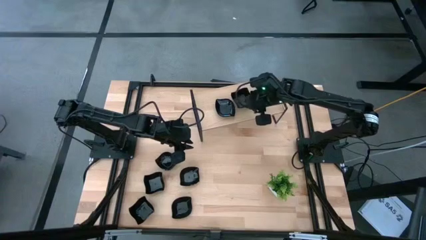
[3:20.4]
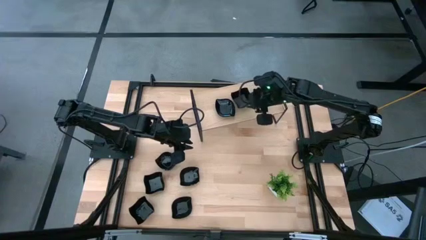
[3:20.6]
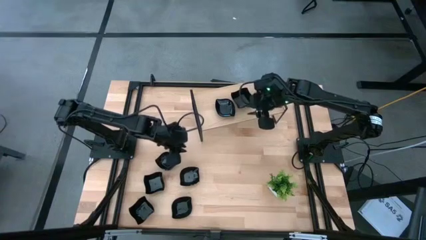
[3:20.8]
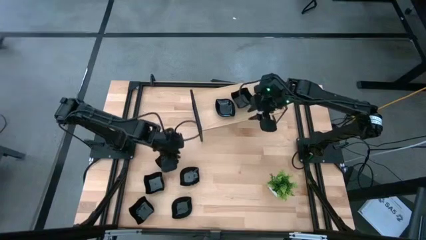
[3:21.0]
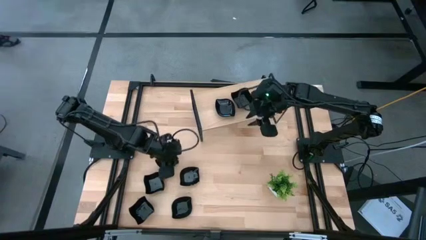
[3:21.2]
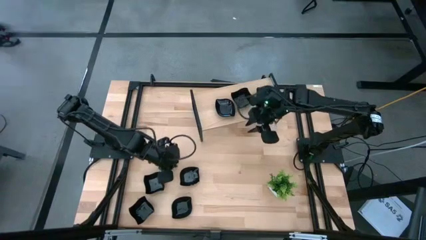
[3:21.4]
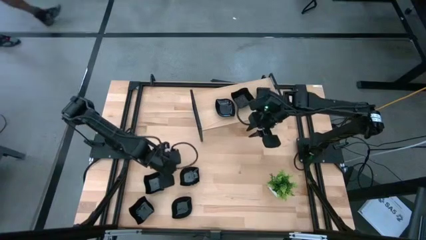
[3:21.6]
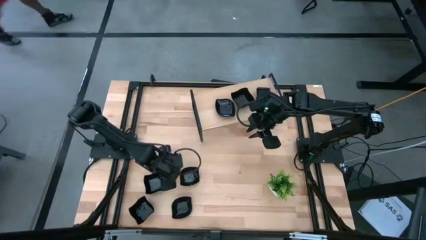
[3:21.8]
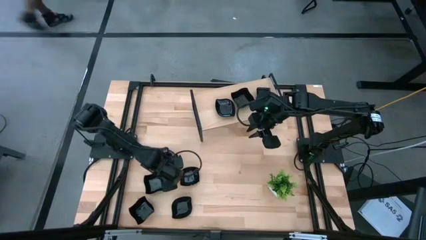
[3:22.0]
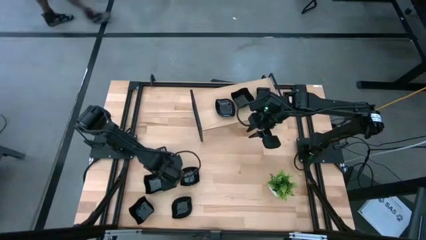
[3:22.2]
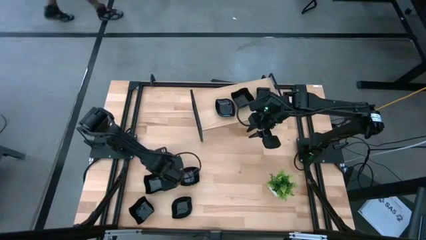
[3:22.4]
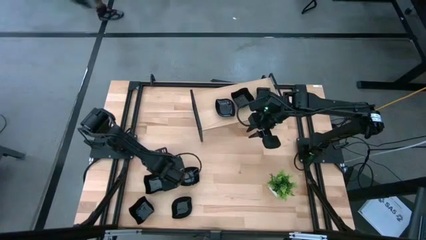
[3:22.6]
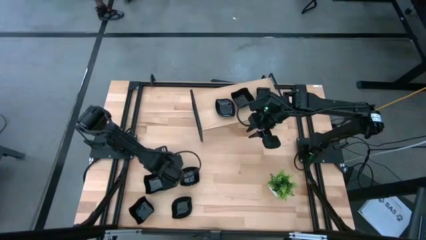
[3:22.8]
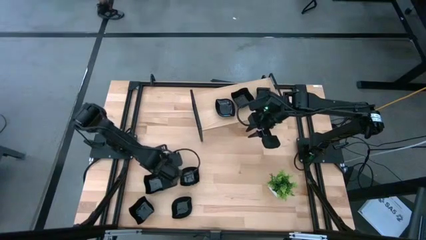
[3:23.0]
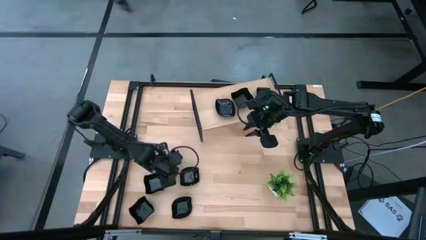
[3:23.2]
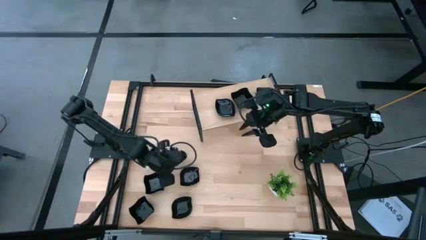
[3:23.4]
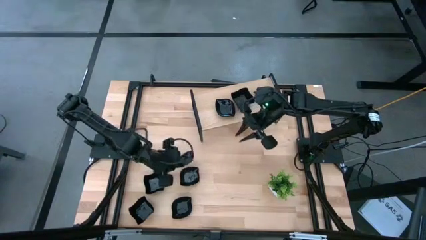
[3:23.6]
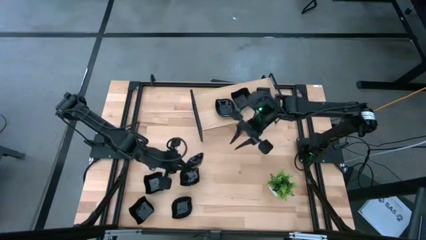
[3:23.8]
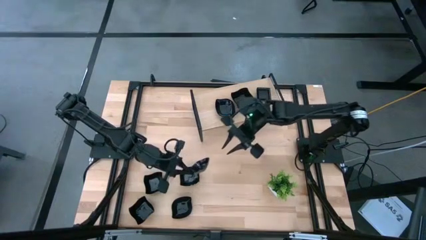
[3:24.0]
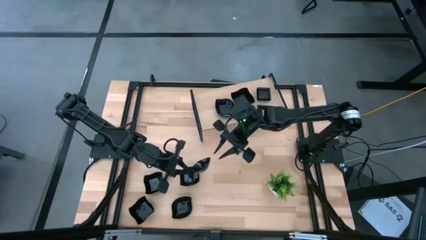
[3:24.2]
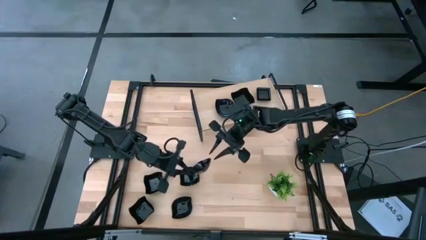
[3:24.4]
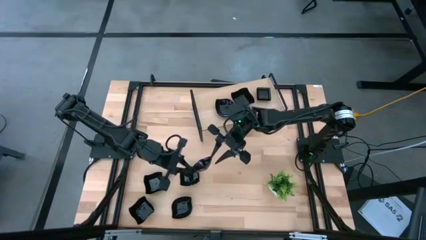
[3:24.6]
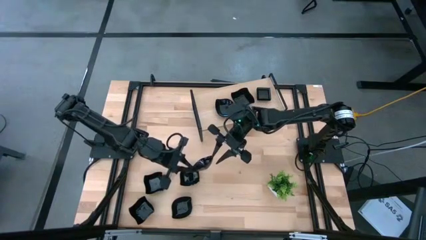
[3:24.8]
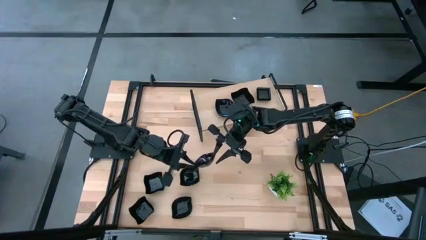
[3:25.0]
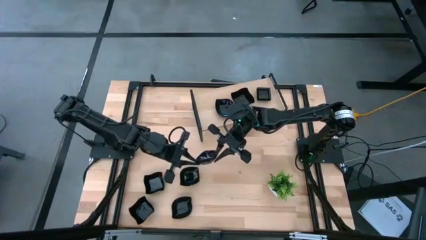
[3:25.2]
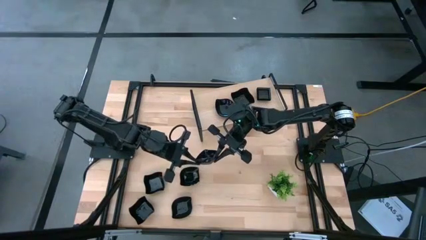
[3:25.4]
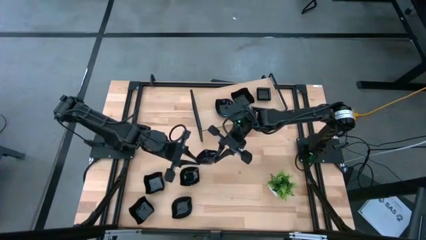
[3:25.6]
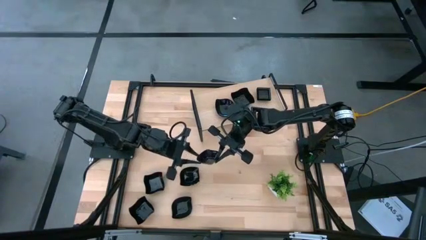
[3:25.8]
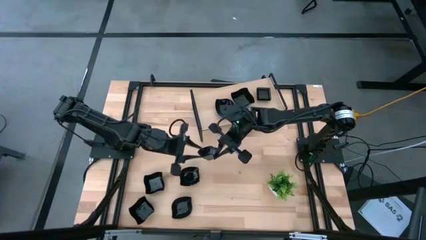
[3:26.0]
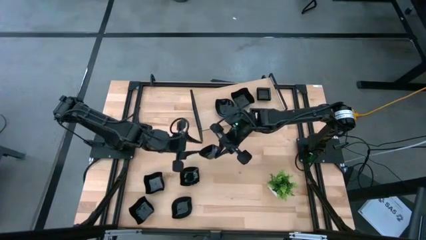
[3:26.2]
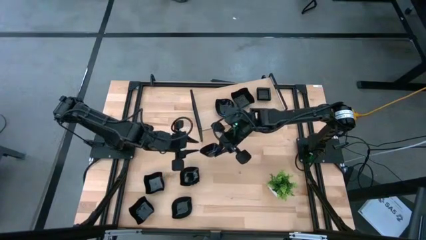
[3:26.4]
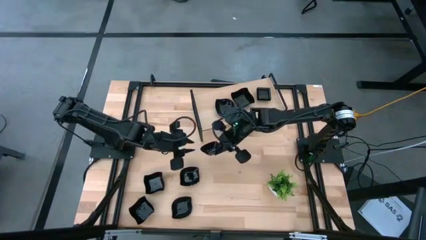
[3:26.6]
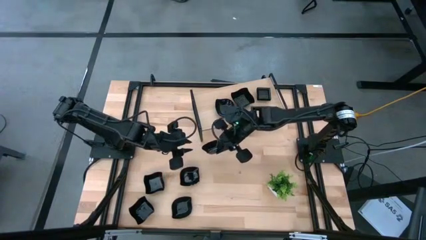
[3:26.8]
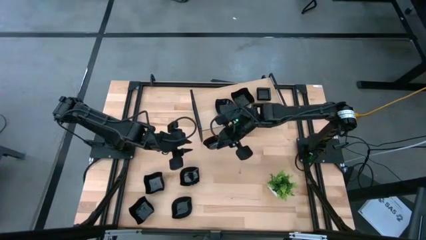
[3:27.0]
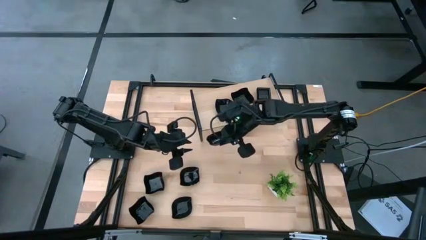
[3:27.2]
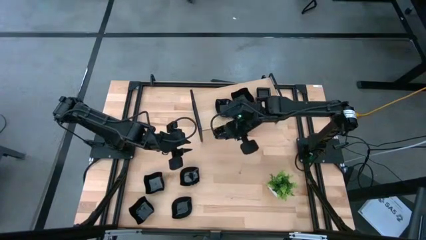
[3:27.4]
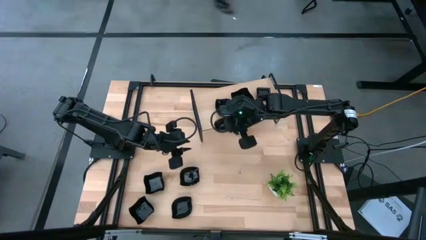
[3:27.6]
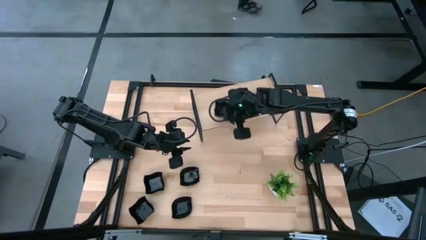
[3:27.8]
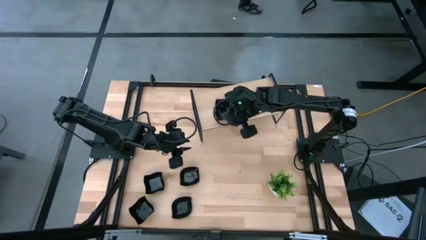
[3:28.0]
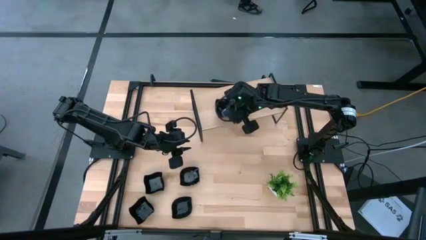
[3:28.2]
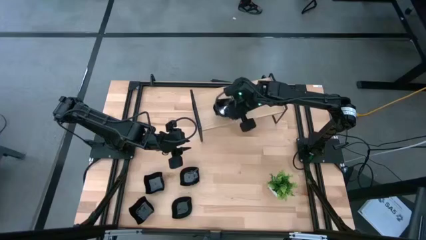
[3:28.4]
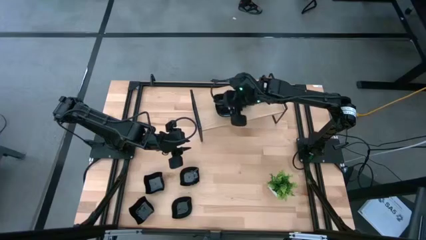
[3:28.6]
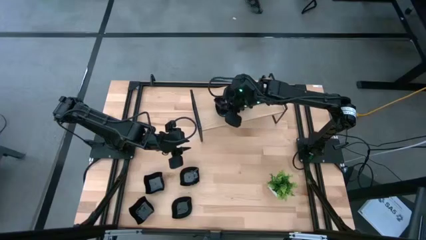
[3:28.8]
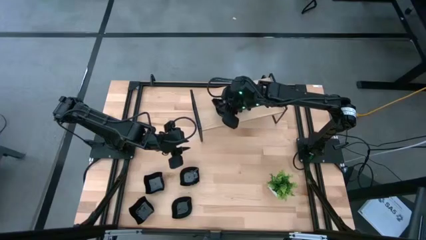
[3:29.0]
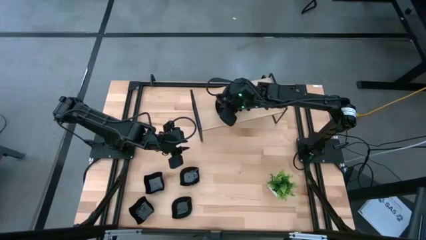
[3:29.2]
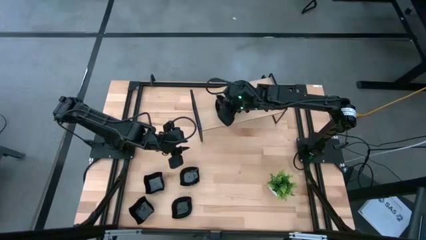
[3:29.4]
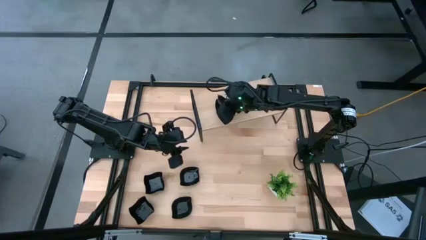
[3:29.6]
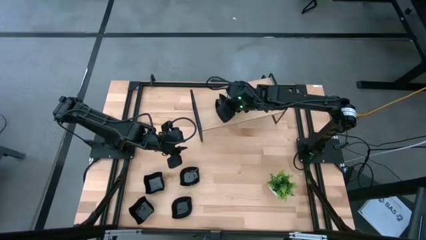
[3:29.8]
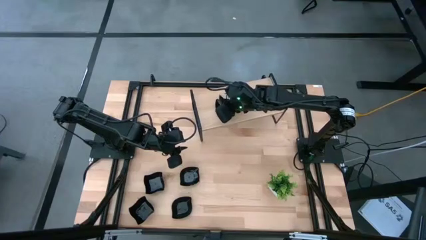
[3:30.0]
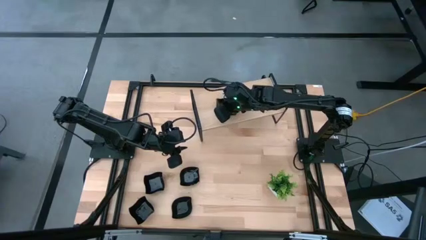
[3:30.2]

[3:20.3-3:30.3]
Task: Pick & Place Mini shaped plates
Stack the leaf-shaped plate on top of the leaf-shaped plate on the shelf

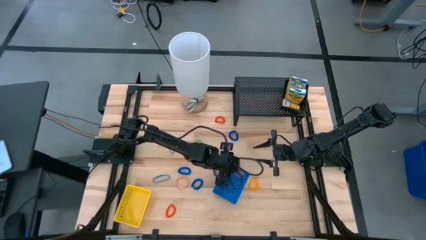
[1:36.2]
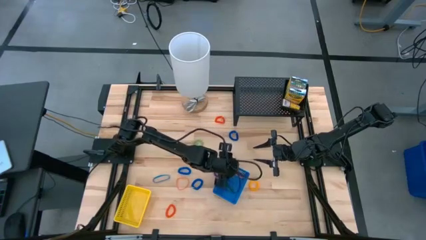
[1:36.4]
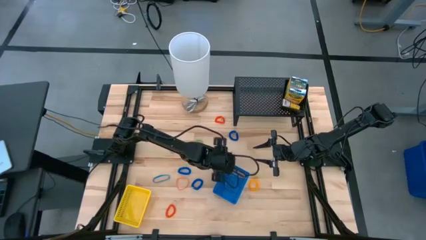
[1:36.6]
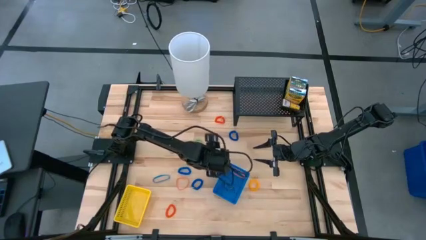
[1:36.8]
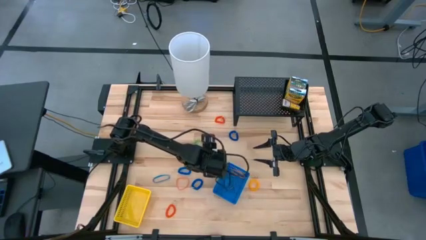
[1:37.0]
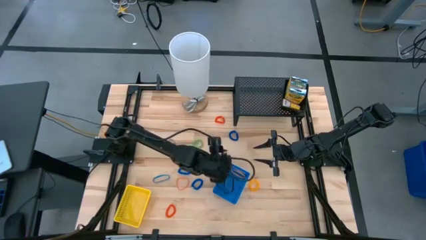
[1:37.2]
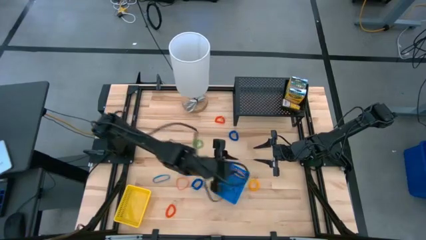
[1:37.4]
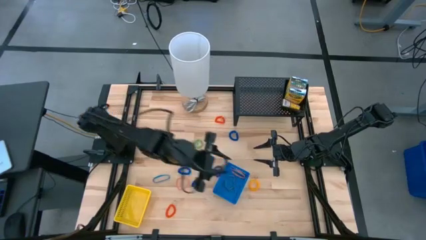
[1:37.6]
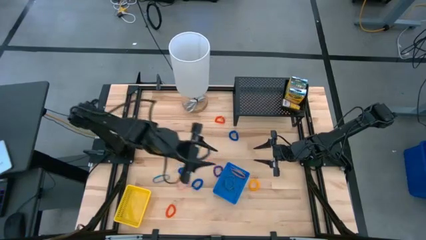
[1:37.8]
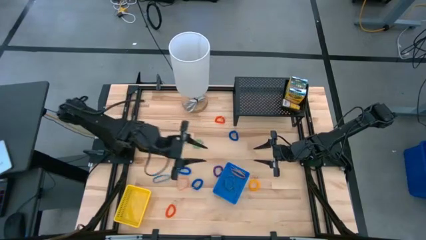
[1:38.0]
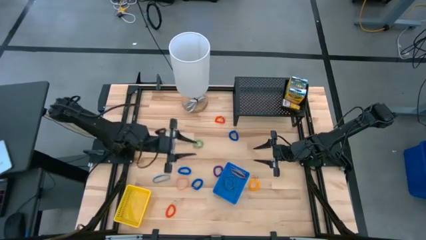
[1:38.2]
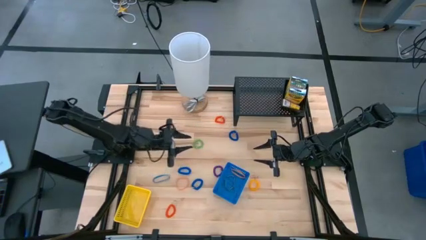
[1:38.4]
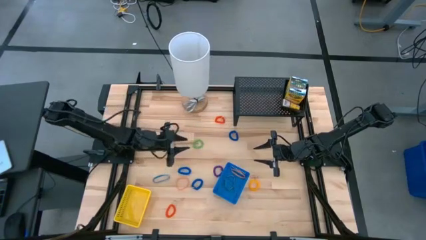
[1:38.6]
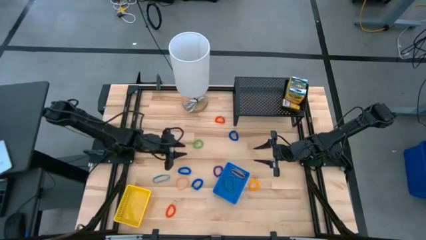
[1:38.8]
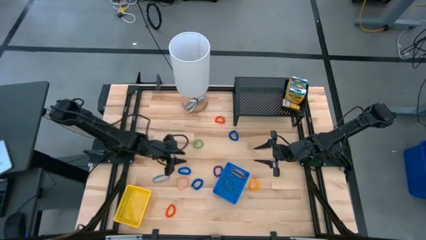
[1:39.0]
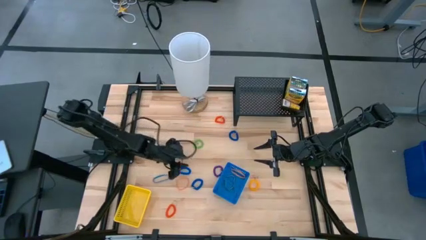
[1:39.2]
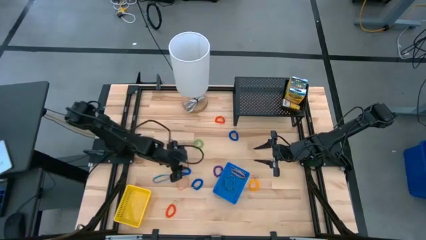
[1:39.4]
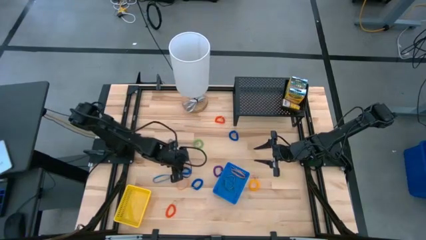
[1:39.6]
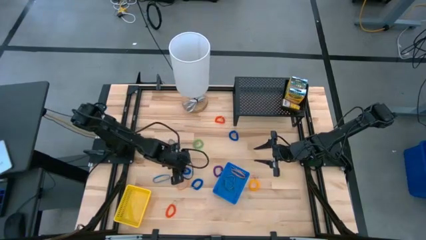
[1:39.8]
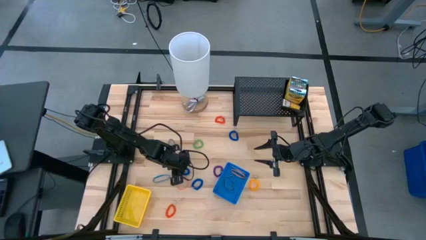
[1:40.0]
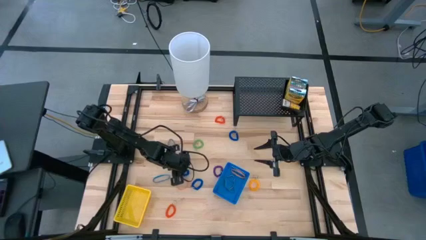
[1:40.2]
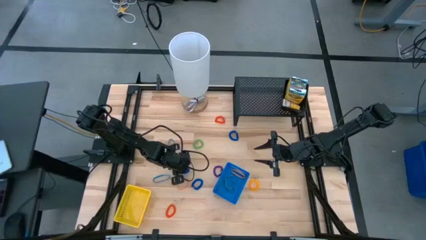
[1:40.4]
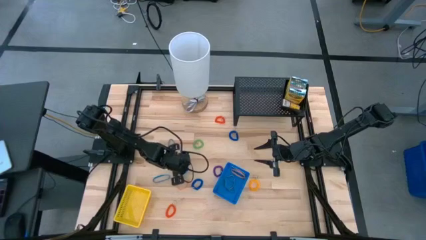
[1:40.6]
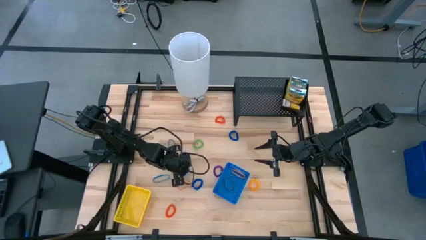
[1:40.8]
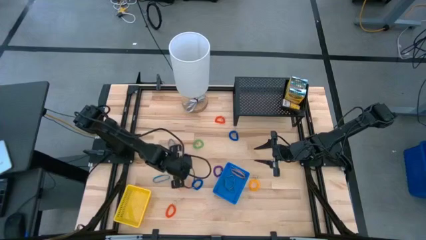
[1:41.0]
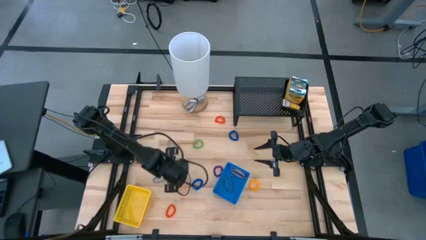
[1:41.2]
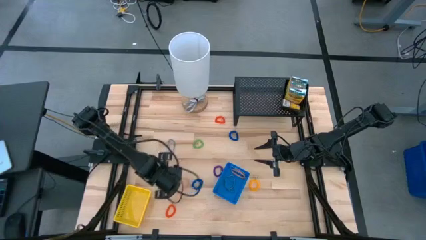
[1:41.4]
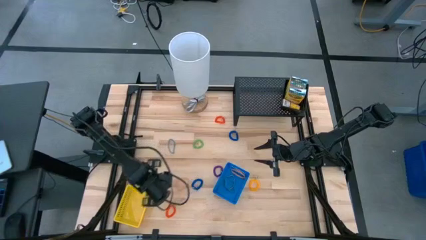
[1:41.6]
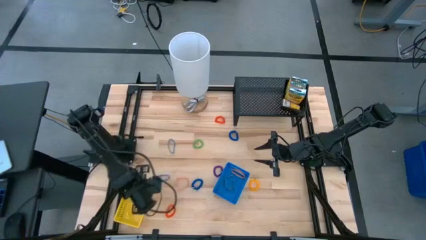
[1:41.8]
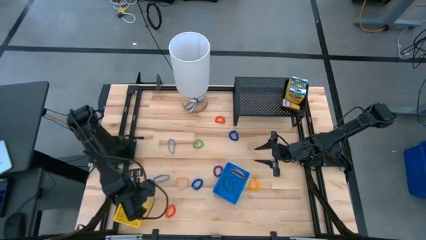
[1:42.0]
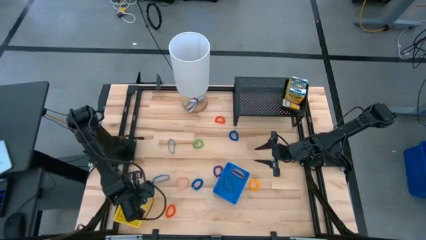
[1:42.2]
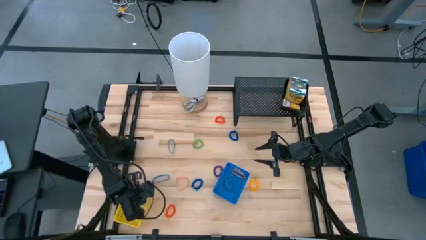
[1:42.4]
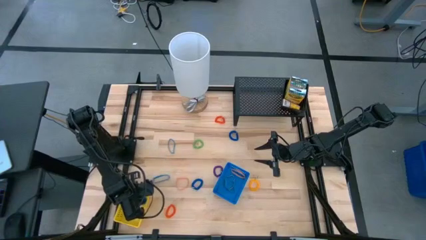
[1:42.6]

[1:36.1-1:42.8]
Task: Pick & Place Office Desk Supplies
Put the blue spring keychain into the yellow bin
